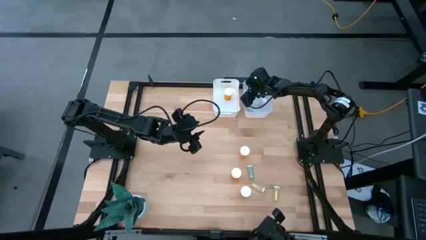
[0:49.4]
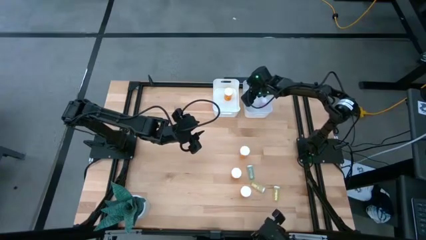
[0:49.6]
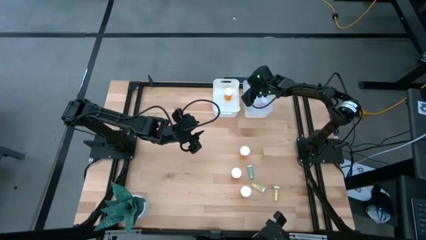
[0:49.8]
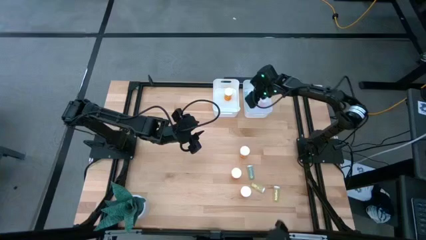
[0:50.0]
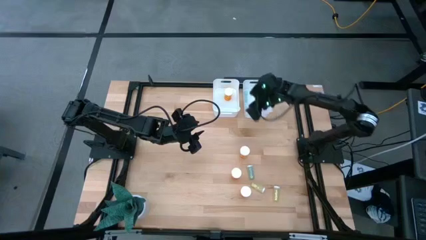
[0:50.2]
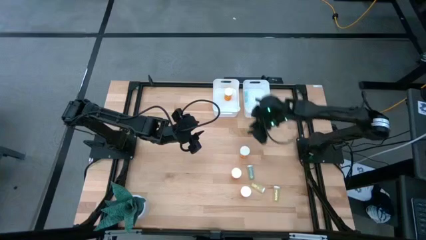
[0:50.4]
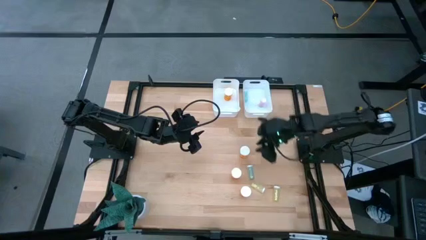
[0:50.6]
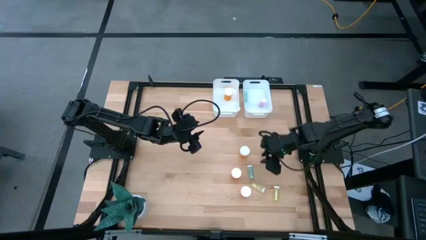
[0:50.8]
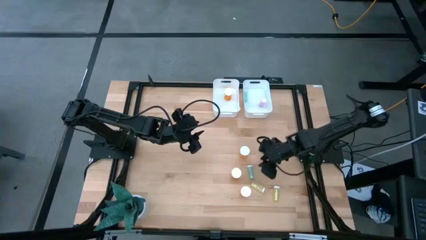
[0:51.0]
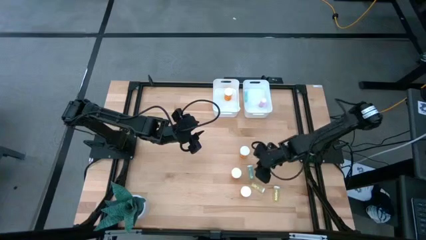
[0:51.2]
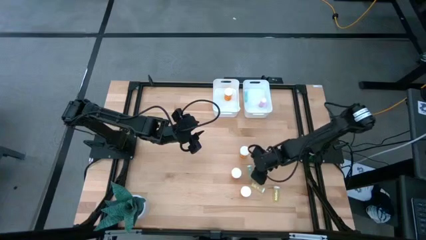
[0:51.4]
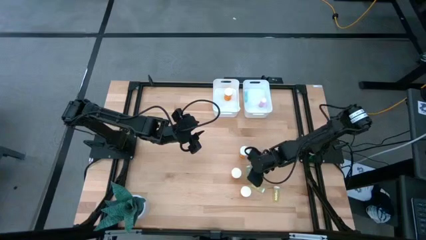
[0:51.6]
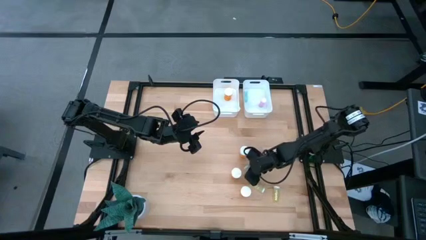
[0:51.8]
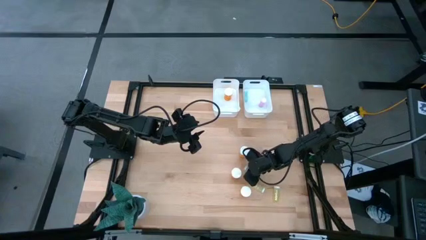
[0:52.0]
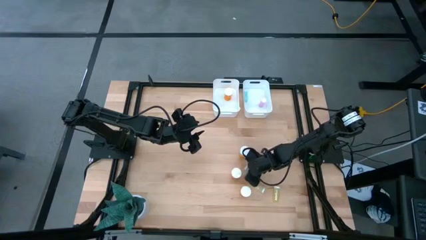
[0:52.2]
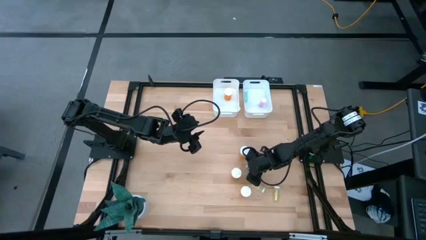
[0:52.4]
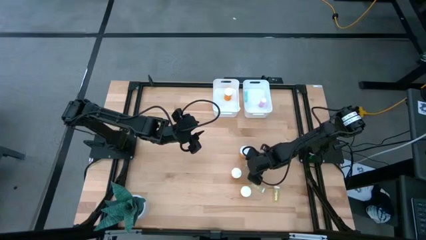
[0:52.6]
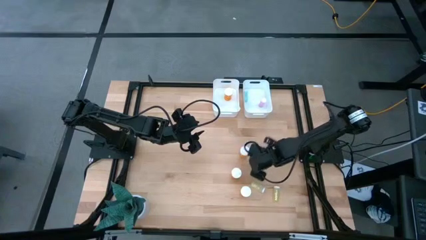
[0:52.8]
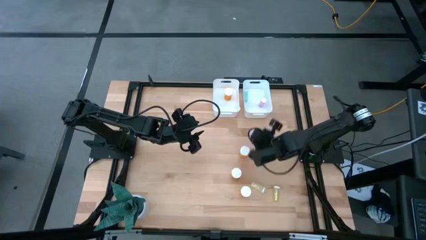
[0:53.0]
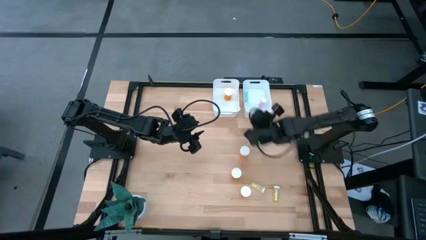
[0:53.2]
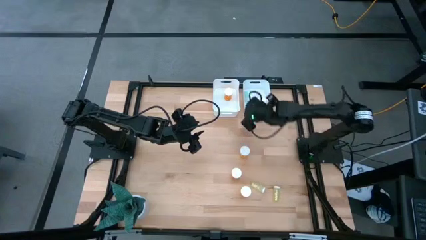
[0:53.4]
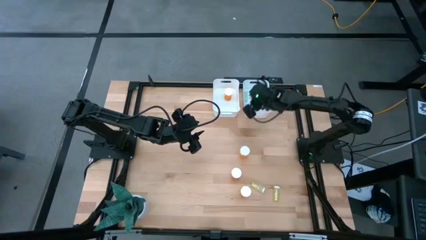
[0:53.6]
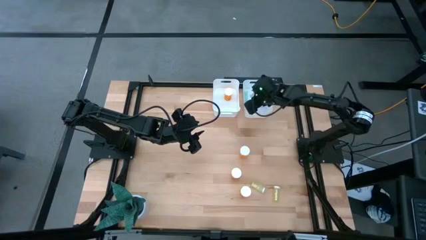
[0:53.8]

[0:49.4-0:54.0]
Task: Pick and place medicine bottles into bin by pill shape (circle, oval)
Put the small blue medicine pill bottle into the right white bin

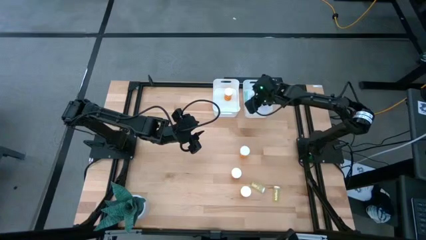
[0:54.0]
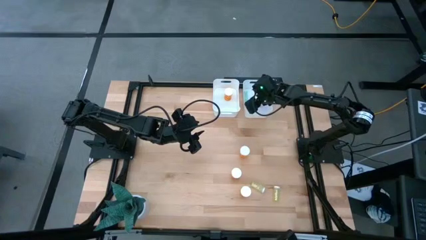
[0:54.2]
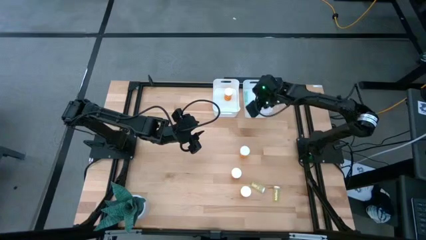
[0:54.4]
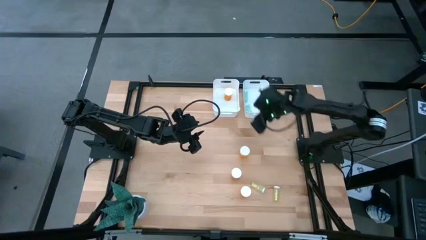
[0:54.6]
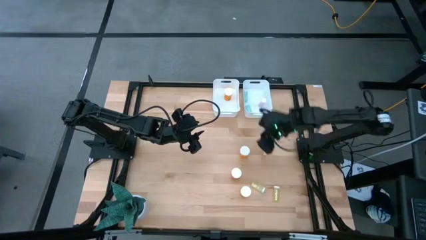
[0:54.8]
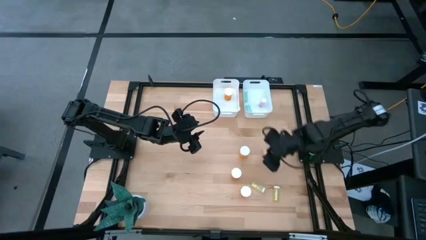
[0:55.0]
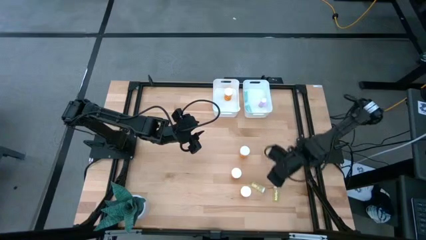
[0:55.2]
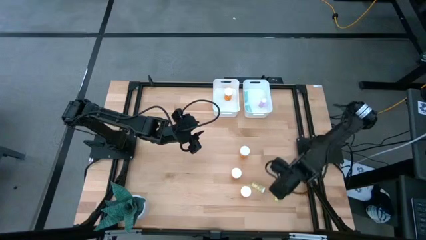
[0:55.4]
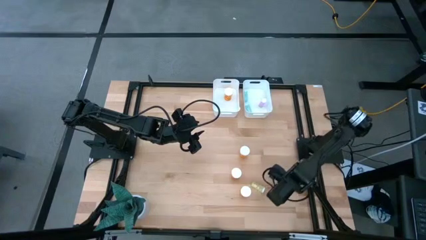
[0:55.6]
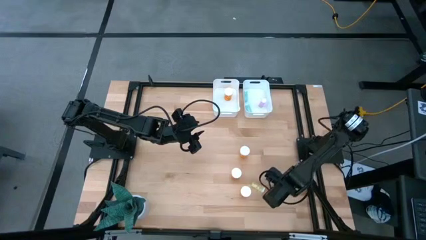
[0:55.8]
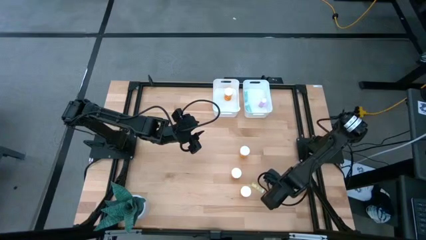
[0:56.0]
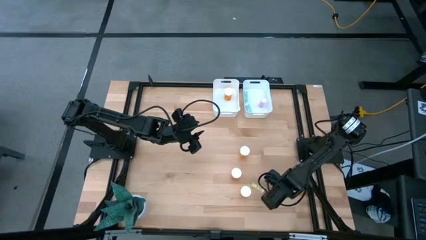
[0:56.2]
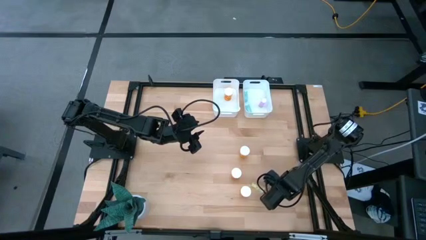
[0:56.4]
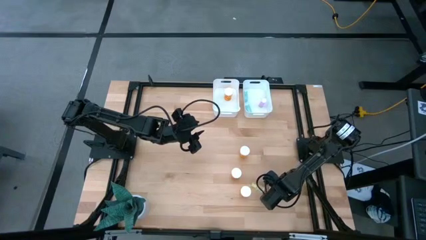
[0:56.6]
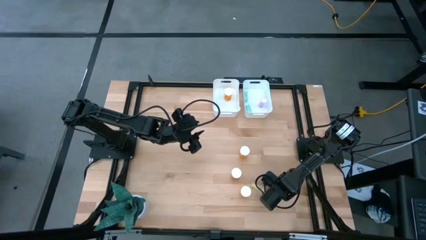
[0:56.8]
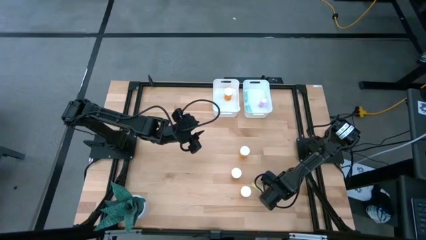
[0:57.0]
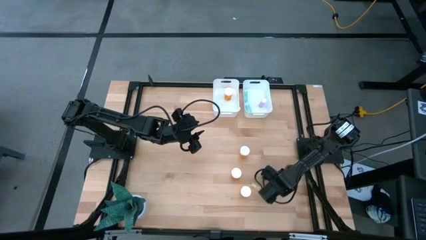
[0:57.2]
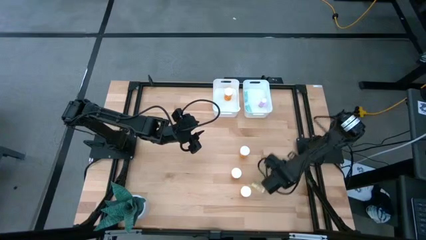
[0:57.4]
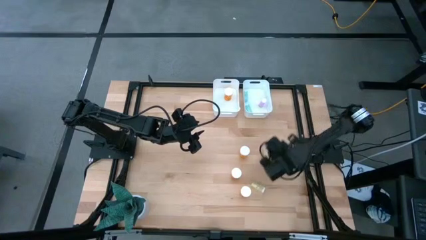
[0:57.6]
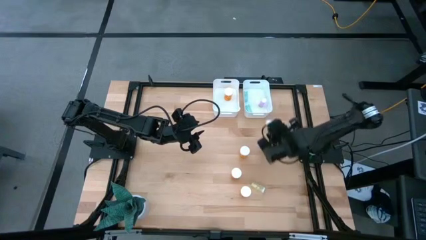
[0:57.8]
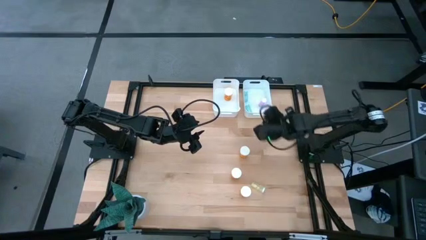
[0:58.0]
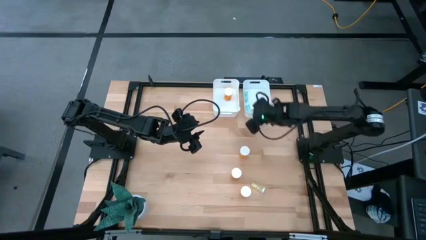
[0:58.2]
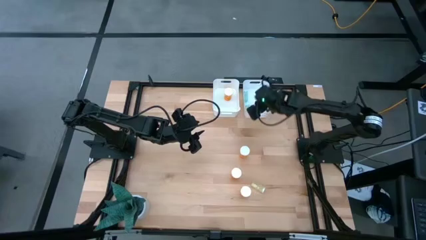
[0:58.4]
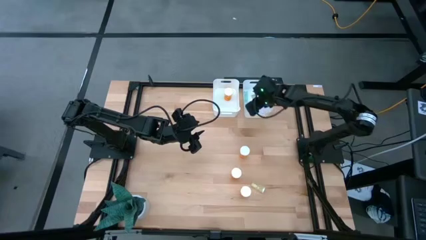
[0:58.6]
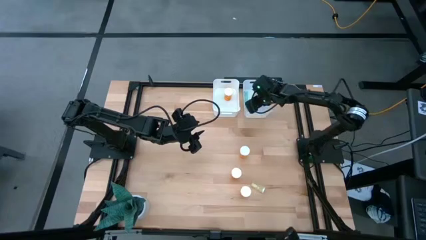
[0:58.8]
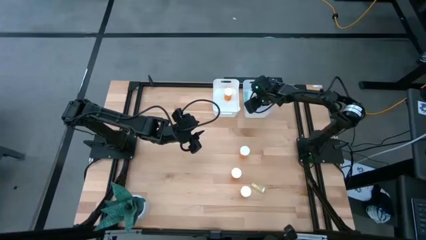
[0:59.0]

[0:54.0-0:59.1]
Put the small yellow medicine pill bottle on the right white bin

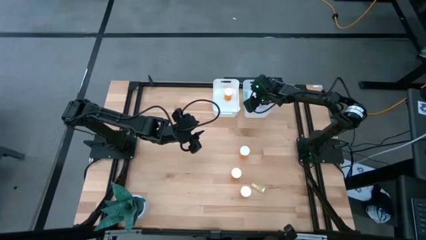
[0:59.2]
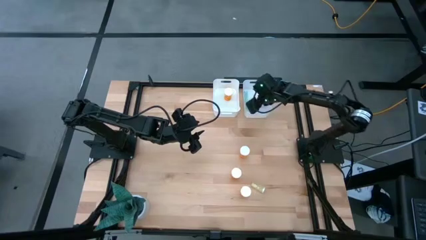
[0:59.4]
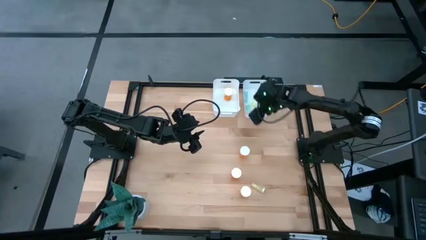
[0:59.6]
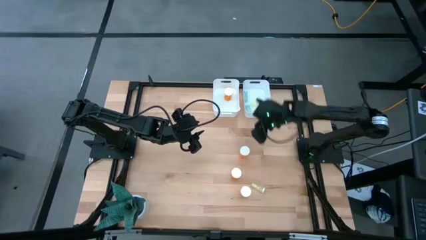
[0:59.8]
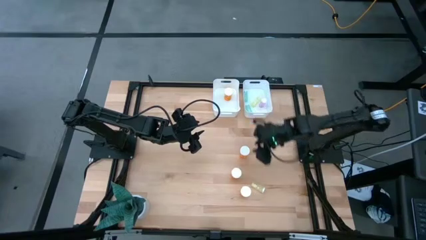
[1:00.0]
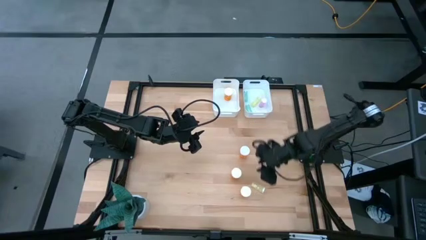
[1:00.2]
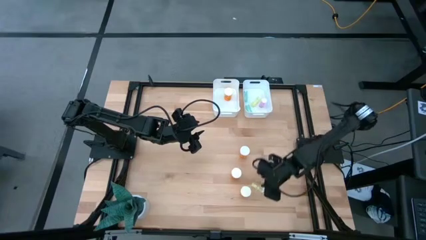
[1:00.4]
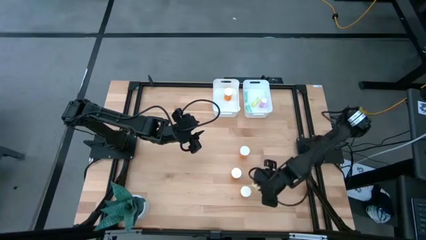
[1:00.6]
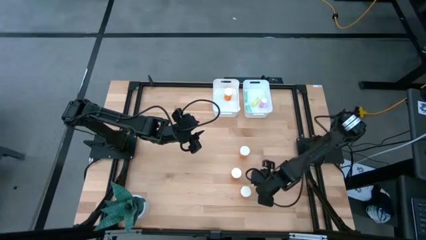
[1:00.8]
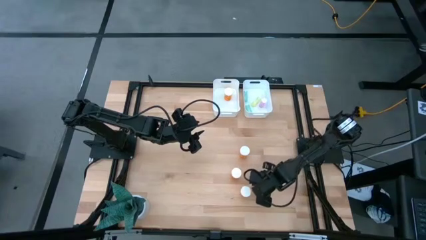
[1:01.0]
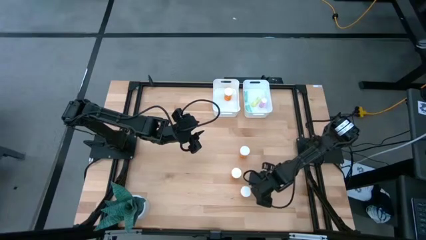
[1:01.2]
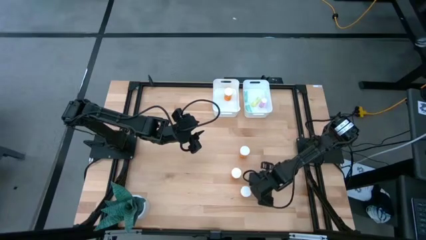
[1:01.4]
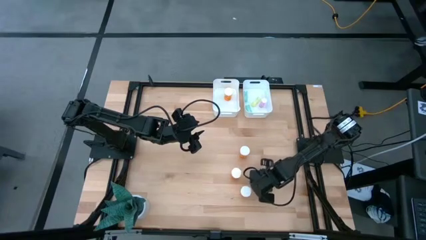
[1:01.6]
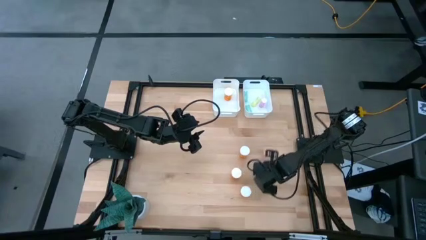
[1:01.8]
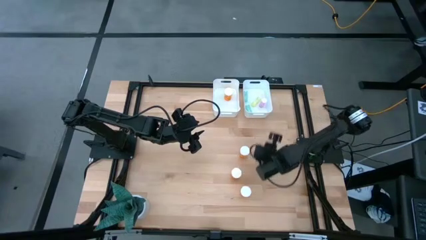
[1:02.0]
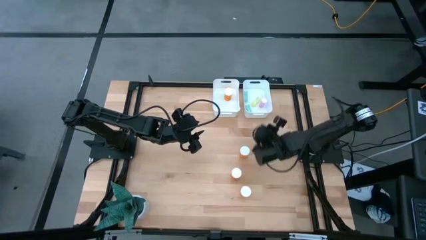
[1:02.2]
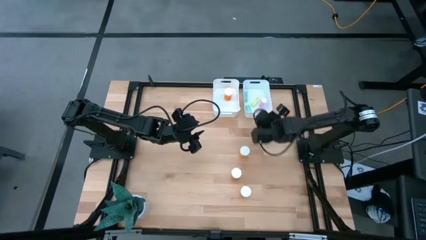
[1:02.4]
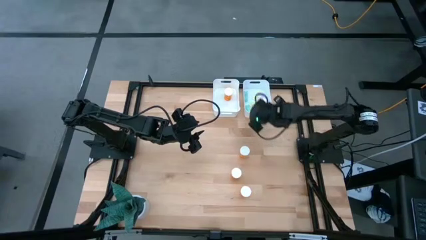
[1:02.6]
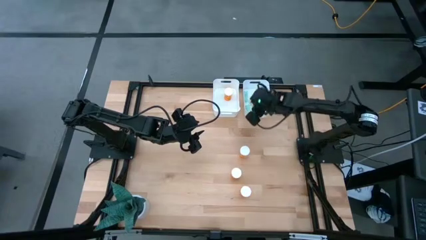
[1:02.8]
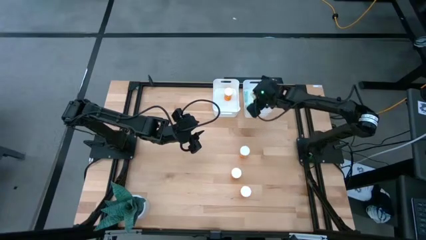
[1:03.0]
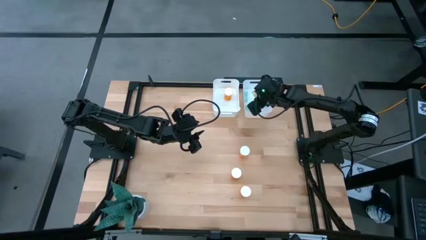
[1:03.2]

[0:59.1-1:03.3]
Put the small yellow medicine pill bottle on the right white bin

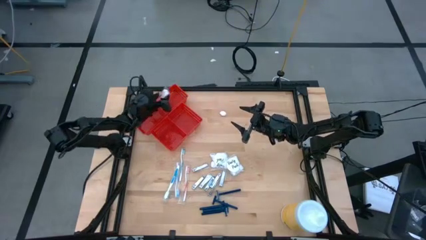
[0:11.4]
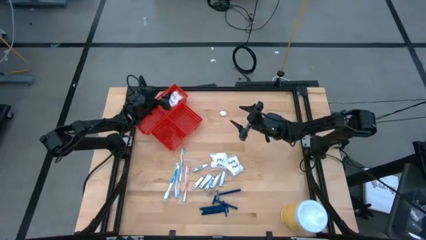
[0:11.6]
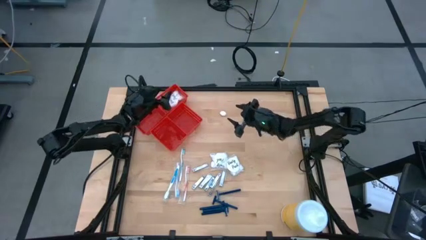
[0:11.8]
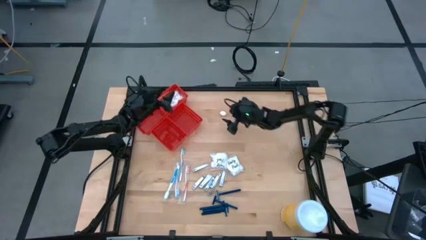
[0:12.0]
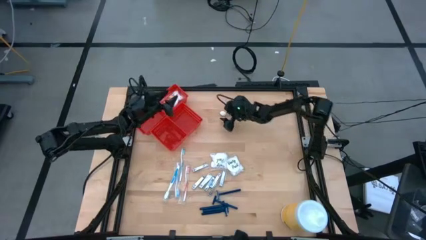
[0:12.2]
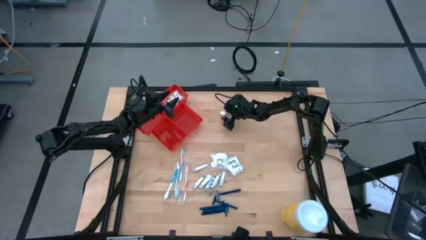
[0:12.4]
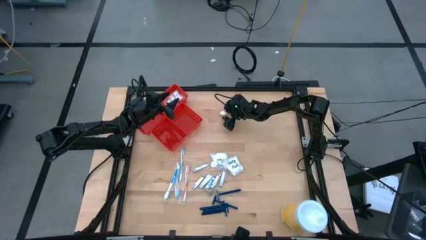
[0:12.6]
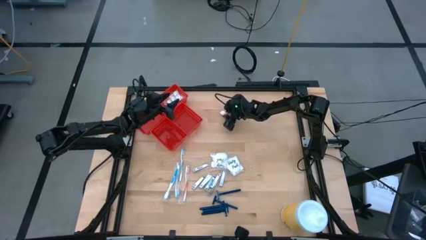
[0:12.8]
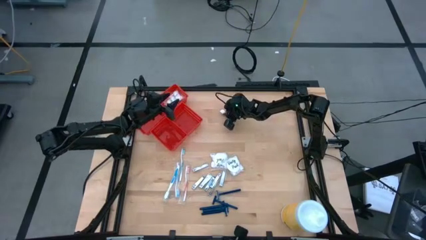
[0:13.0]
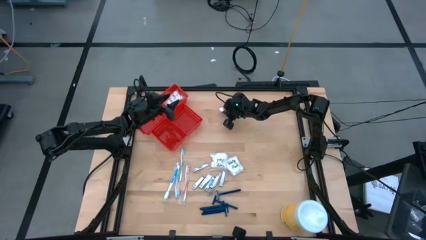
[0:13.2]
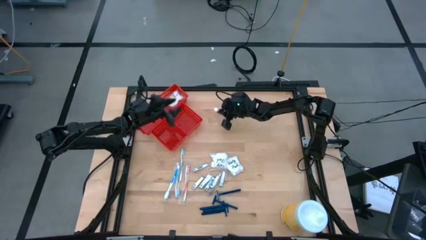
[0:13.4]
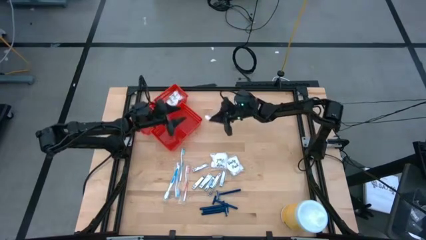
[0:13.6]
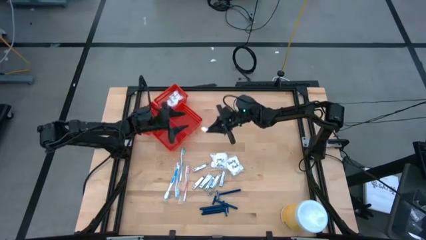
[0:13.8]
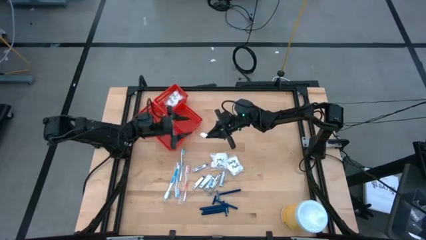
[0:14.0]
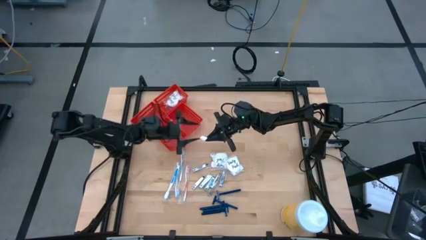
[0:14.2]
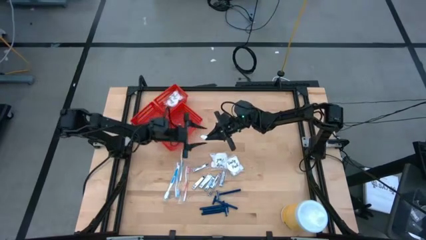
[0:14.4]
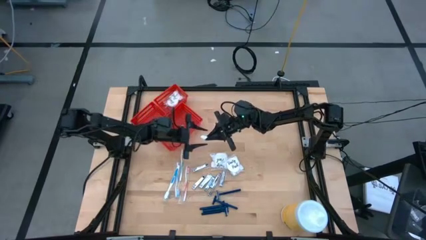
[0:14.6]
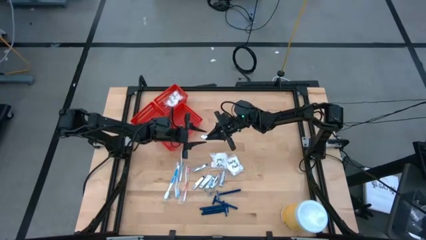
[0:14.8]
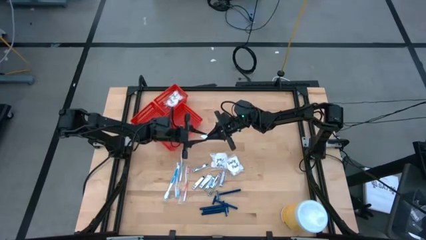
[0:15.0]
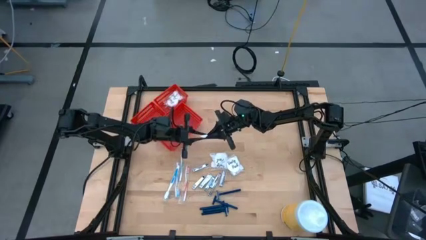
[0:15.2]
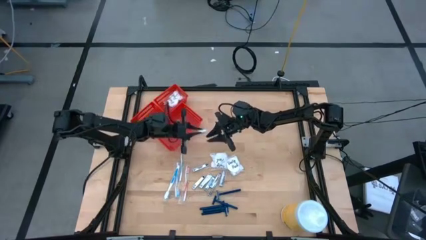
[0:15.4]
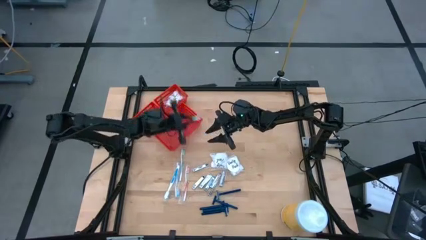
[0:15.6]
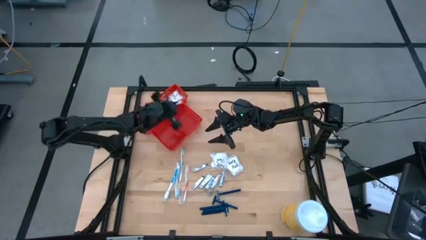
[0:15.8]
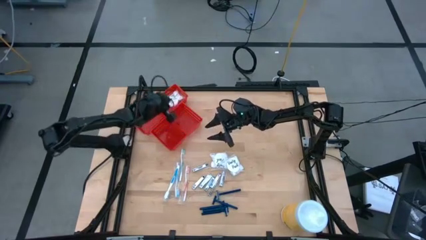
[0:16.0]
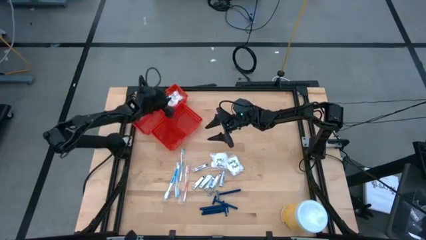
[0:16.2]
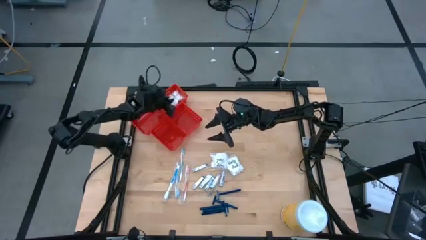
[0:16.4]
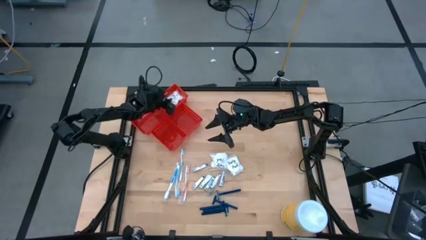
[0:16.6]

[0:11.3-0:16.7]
Task: Pick & Place Travel size toiletries
Put the right vanity pack into the horizontal right red bin
